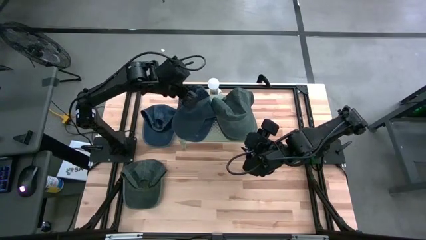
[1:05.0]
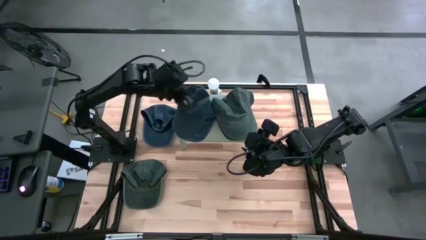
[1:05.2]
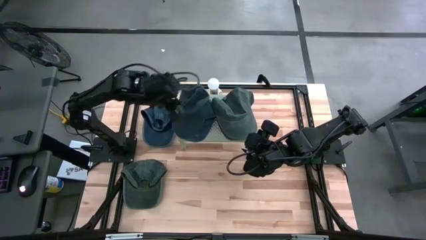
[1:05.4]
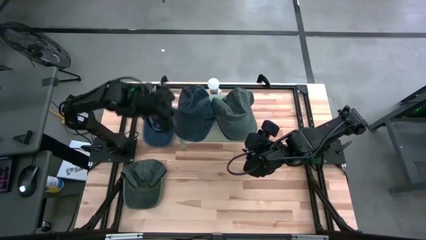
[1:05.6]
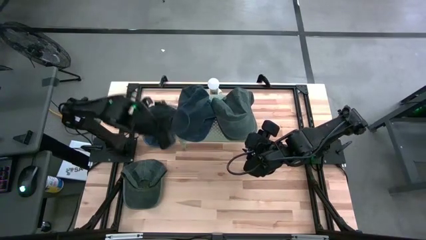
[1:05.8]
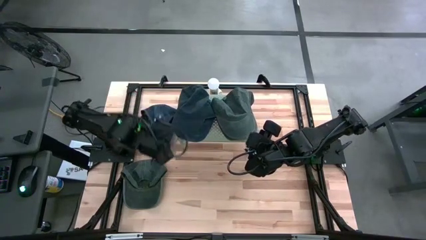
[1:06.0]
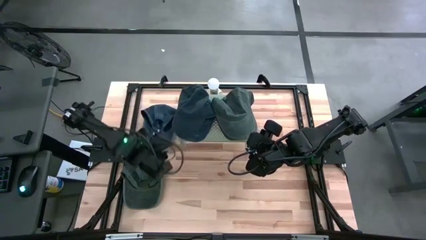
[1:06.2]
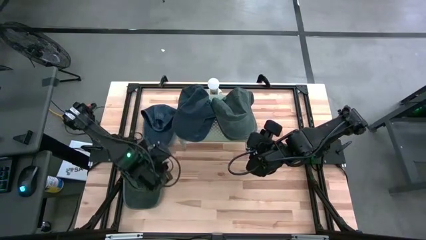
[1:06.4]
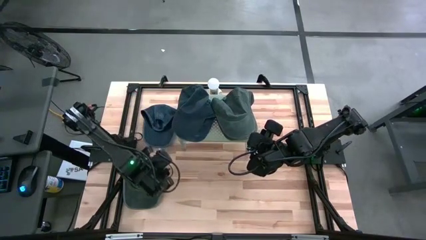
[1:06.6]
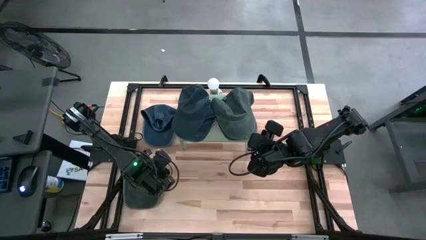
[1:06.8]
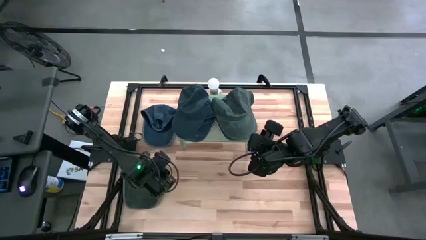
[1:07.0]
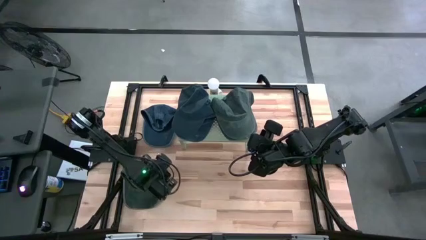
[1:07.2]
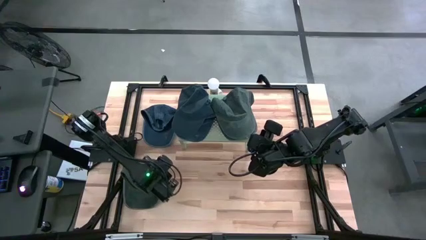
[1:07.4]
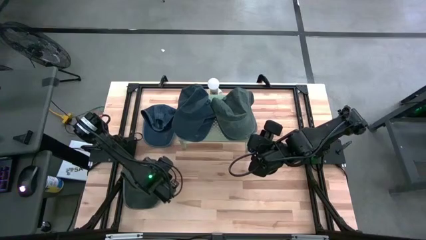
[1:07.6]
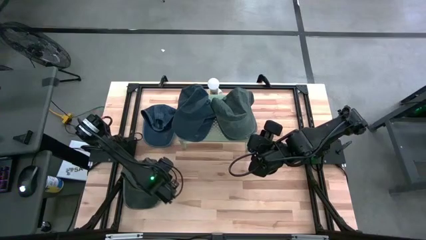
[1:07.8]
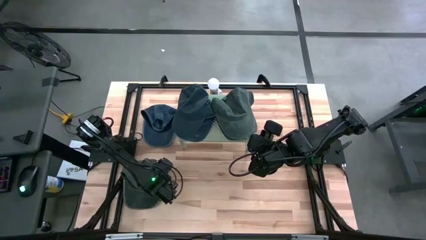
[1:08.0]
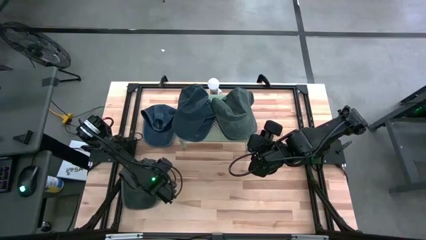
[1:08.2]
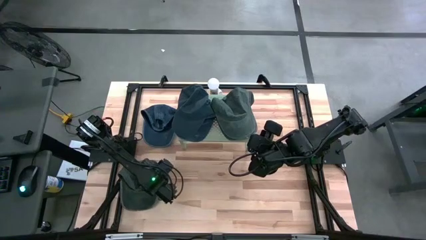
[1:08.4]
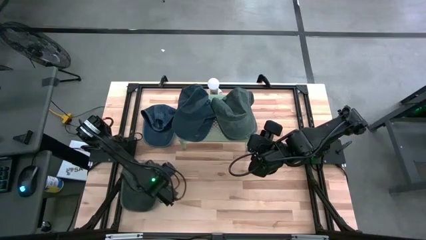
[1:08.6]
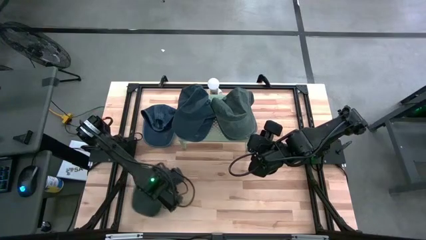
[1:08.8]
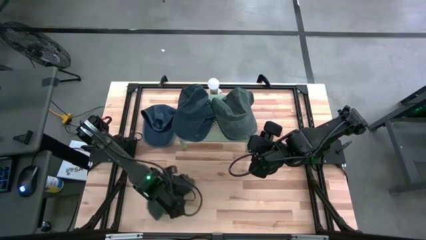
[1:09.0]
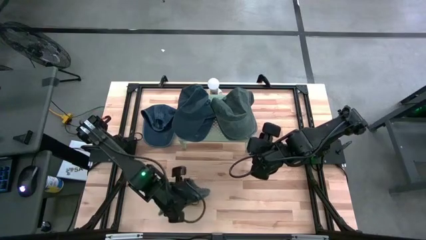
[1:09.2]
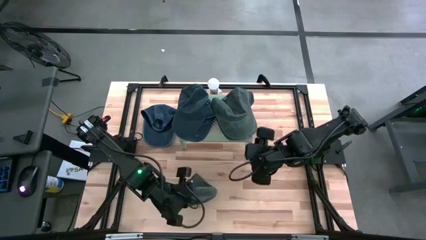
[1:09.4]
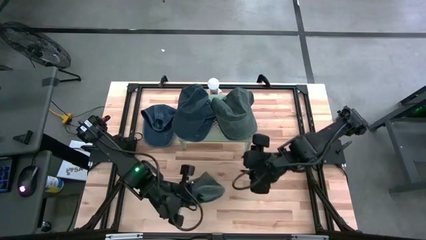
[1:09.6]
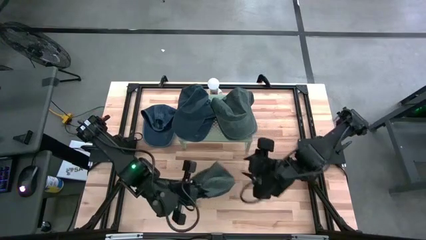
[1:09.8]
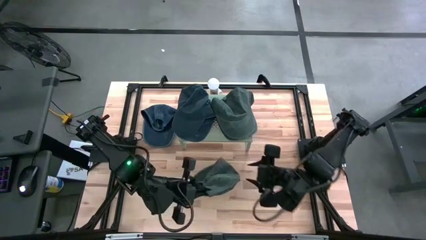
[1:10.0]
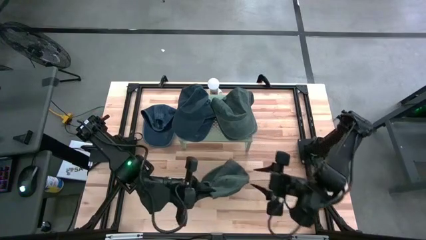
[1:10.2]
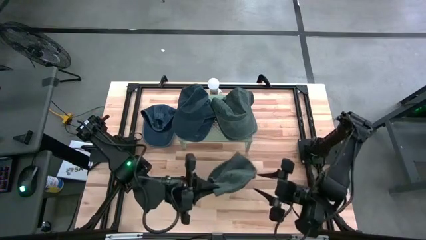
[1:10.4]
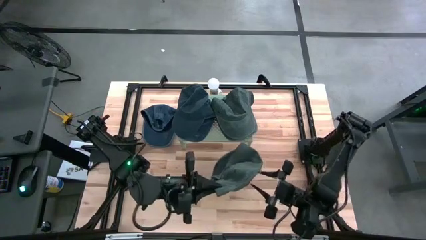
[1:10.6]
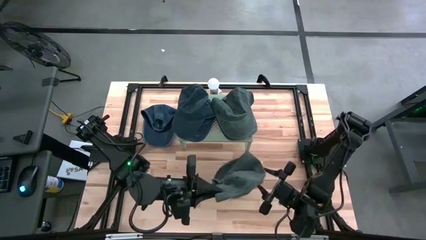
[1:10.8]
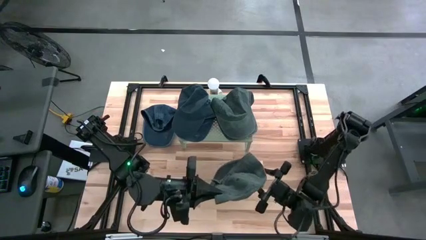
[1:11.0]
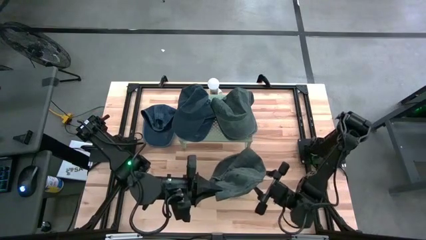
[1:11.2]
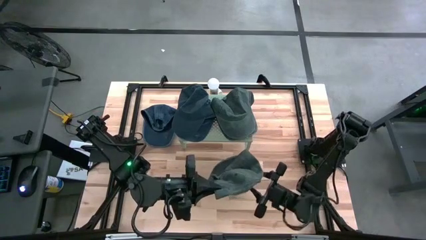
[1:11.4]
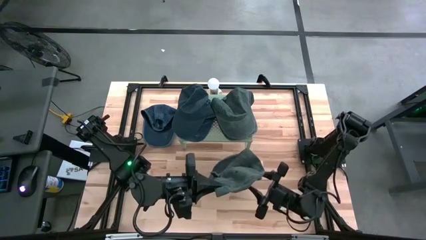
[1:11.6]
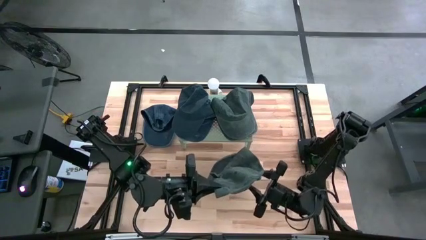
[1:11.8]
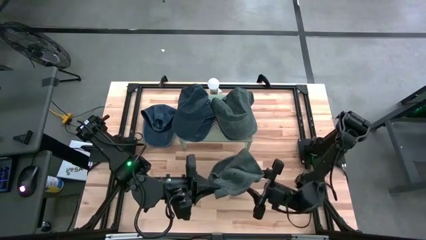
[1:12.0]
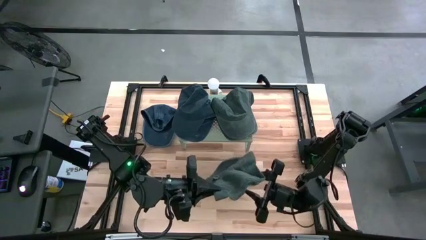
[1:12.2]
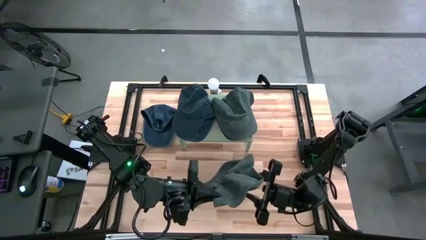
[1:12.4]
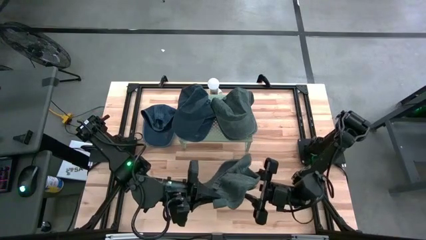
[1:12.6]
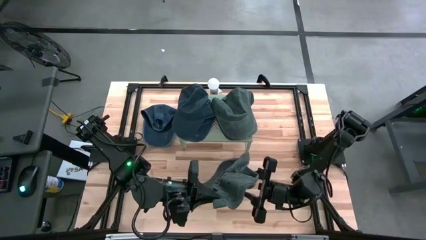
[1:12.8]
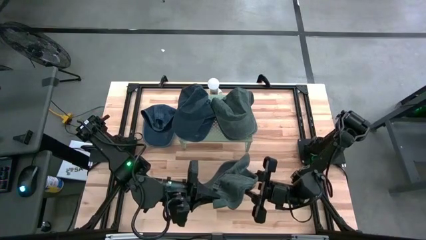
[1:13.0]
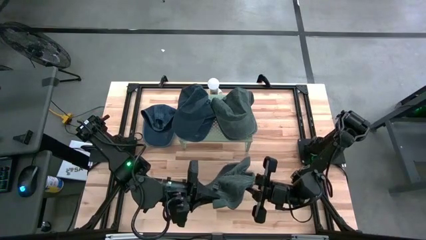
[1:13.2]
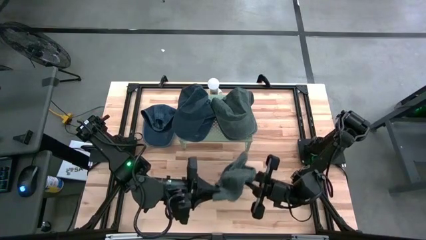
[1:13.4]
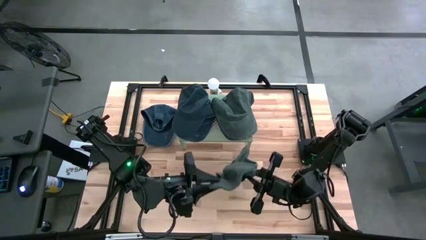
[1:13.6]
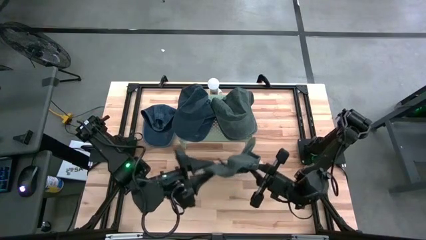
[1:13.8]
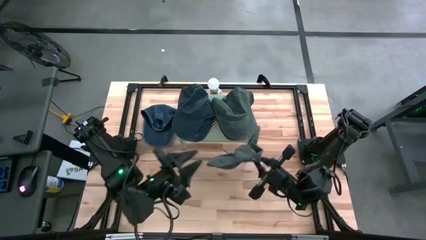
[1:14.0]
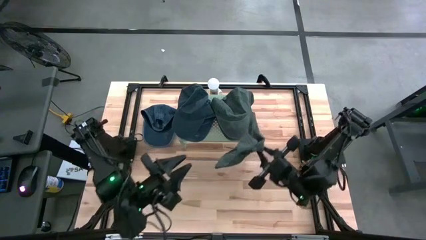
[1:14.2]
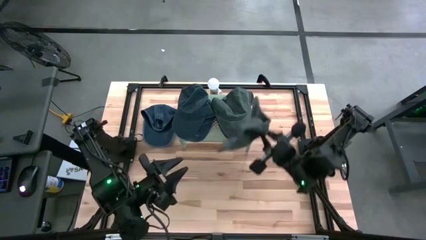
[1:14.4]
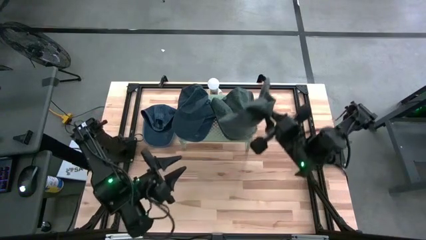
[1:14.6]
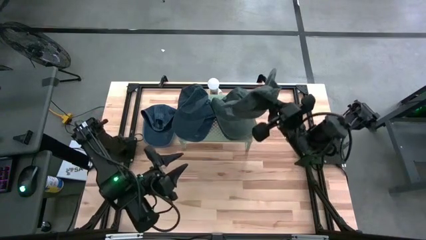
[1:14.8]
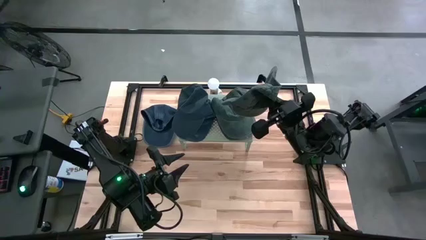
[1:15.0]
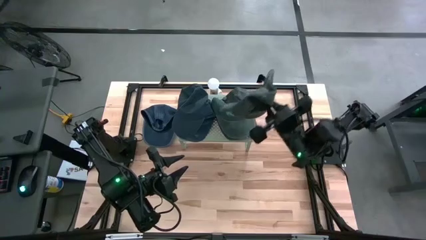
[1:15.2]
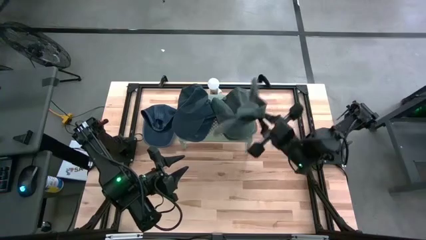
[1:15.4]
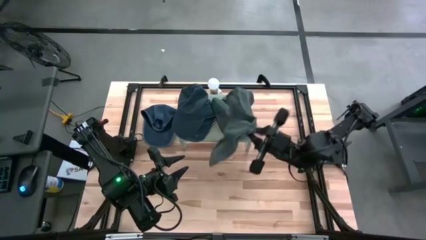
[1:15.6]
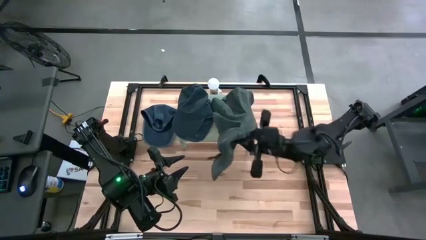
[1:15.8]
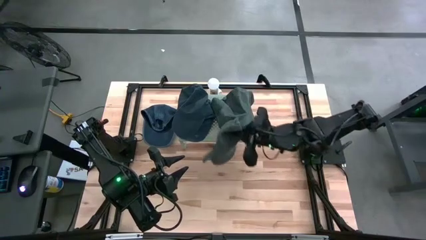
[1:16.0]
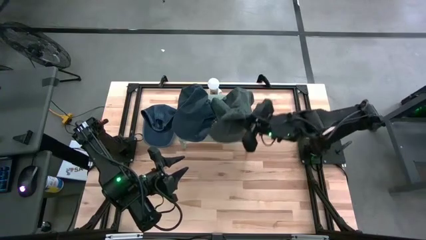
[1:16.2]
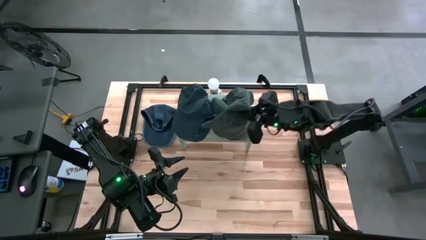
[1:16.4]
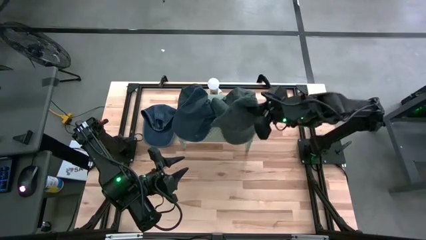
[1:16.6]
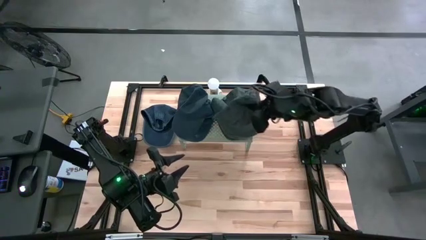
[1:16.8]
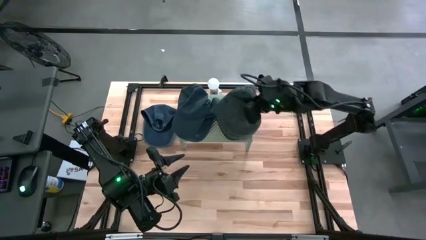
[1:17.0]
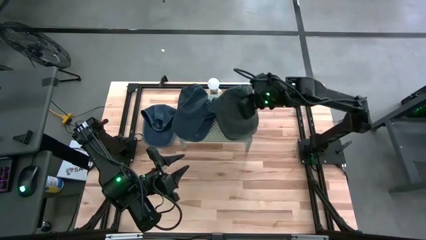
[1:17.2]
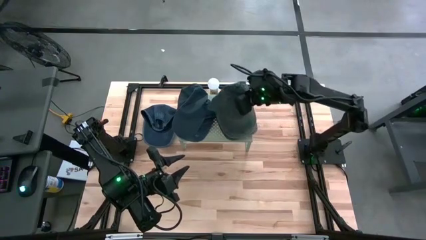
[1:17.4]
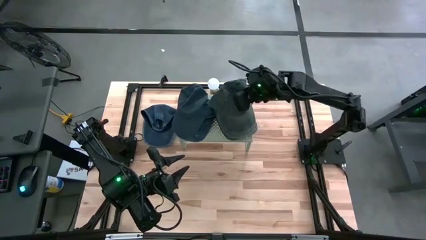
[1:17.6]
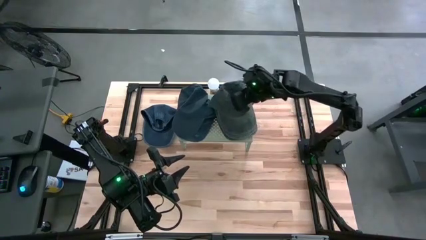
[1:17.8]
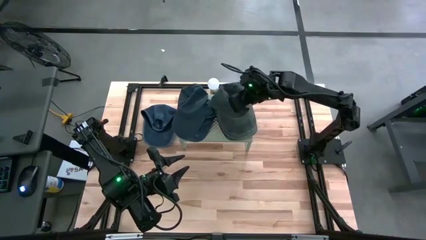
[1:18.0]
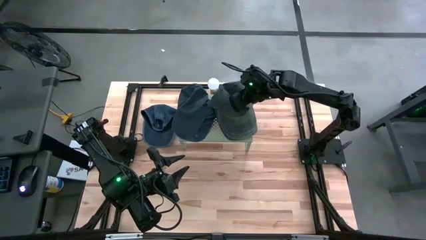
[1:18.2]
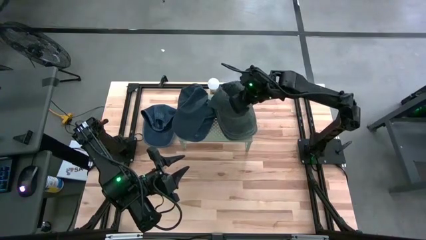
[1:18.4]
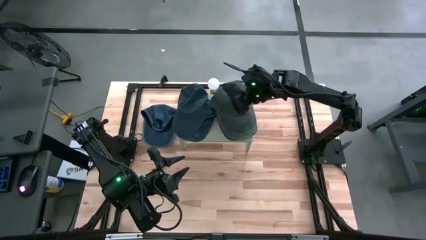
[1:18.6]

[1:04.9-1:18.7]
Task: Pick & Place hat
Stack the gray cap on the top of the gray cap on the shelf
